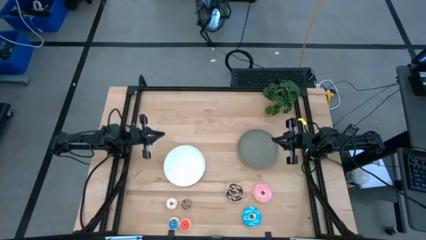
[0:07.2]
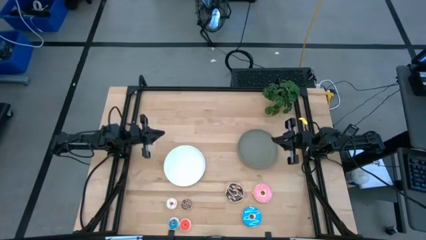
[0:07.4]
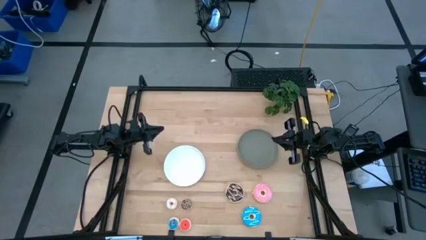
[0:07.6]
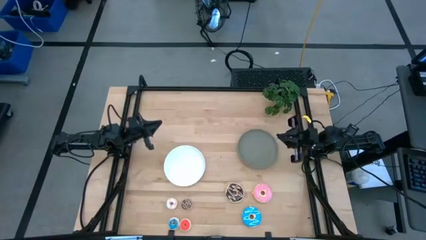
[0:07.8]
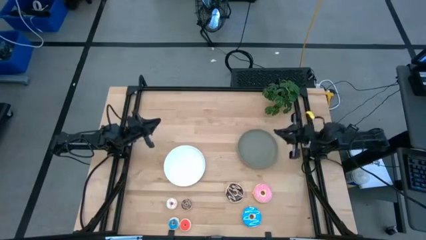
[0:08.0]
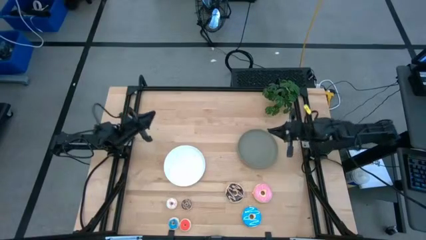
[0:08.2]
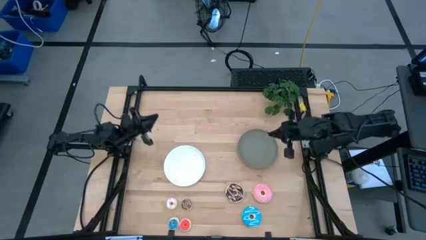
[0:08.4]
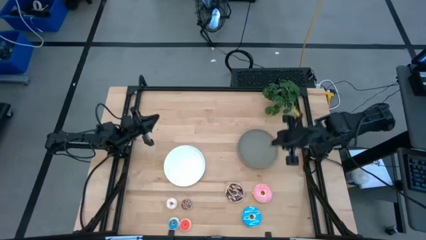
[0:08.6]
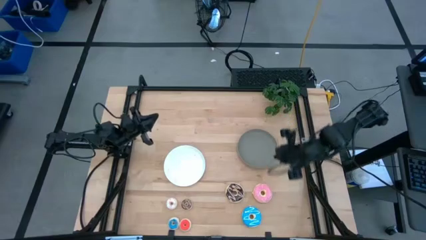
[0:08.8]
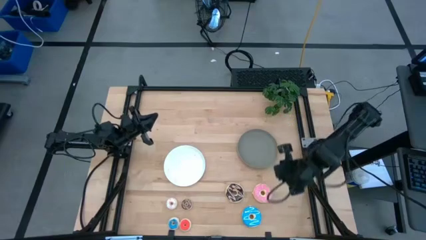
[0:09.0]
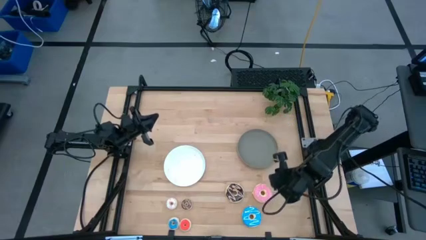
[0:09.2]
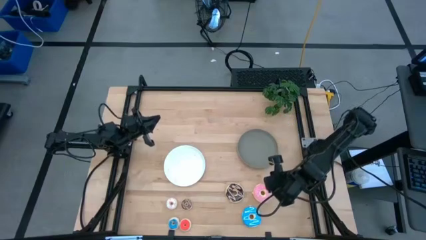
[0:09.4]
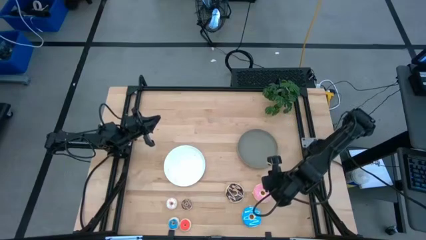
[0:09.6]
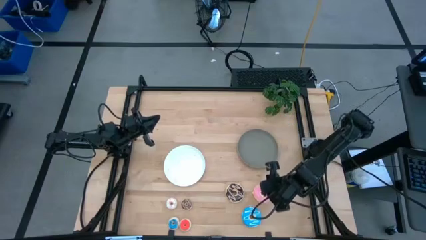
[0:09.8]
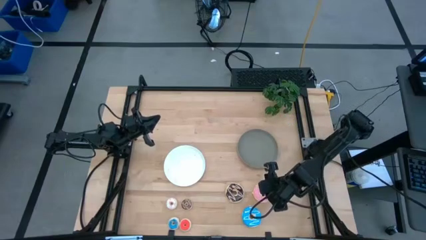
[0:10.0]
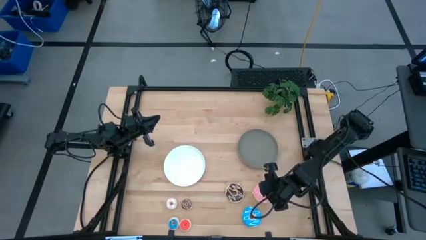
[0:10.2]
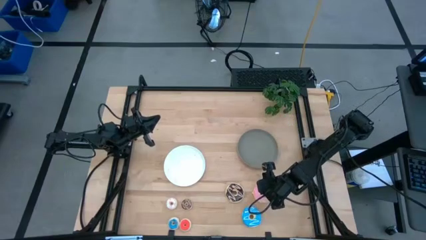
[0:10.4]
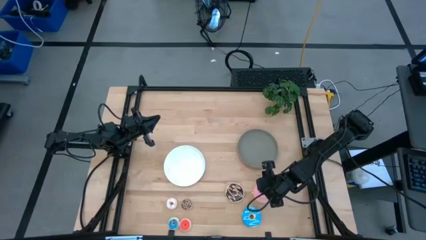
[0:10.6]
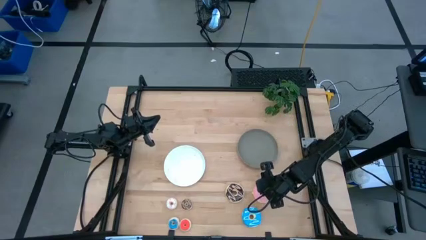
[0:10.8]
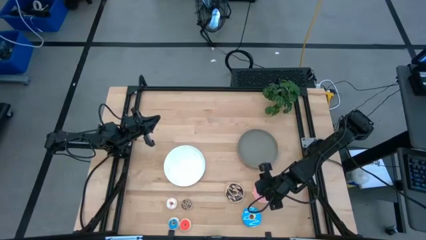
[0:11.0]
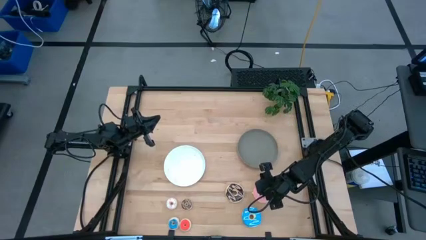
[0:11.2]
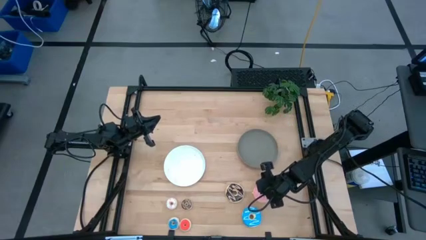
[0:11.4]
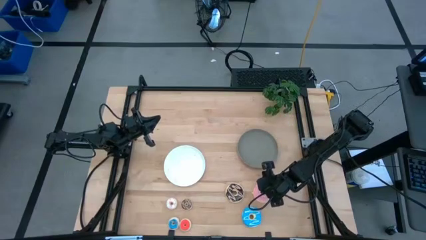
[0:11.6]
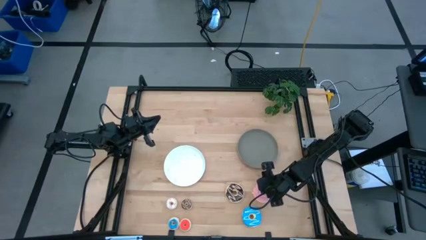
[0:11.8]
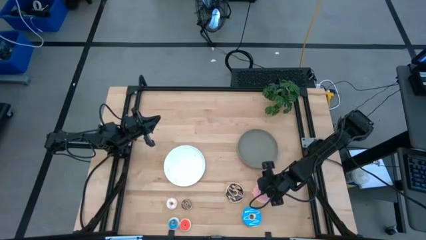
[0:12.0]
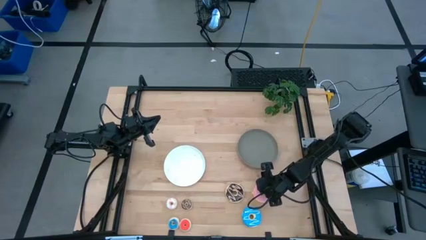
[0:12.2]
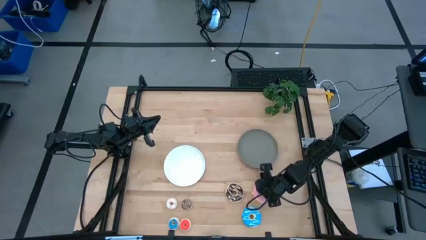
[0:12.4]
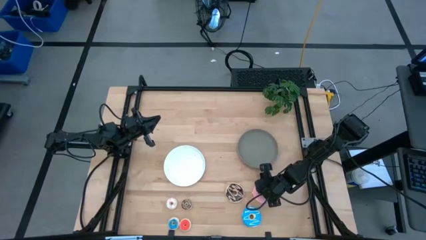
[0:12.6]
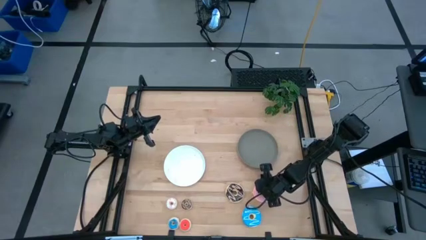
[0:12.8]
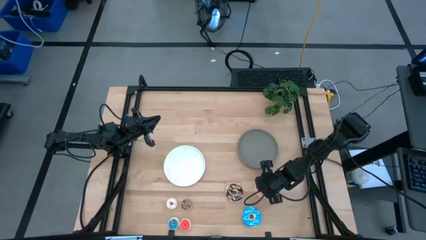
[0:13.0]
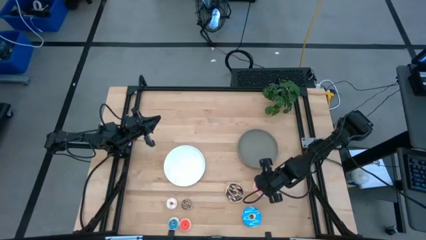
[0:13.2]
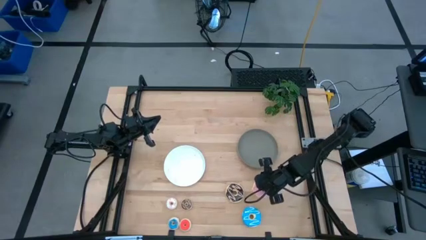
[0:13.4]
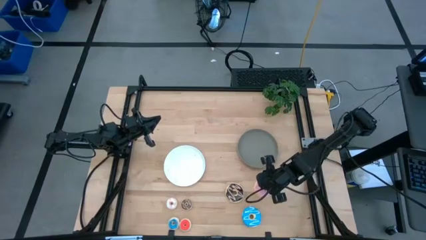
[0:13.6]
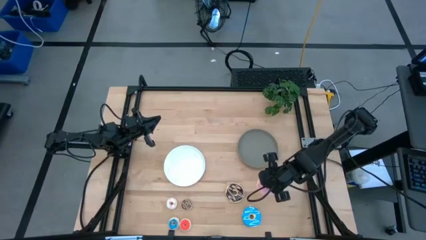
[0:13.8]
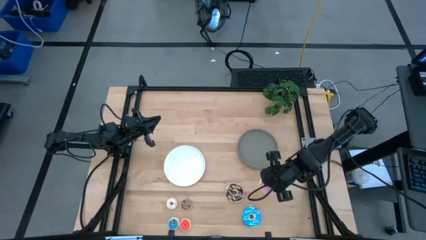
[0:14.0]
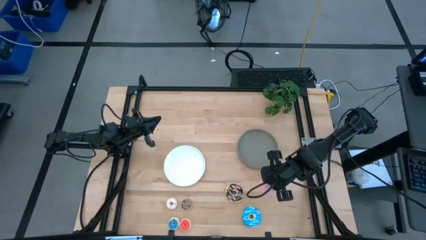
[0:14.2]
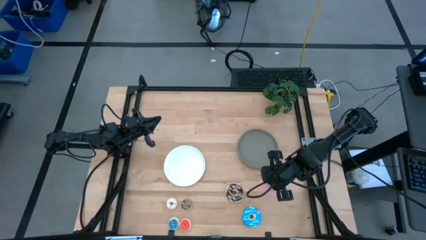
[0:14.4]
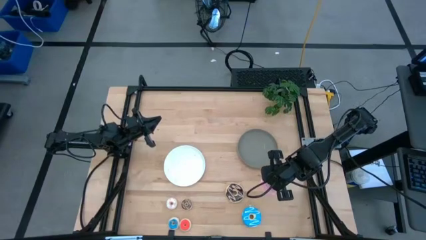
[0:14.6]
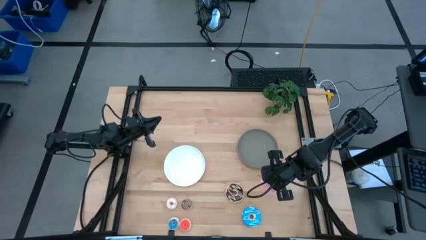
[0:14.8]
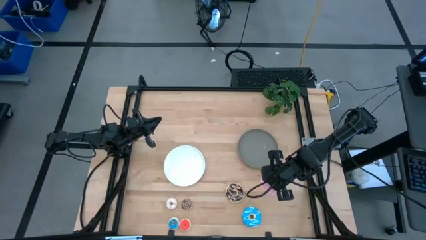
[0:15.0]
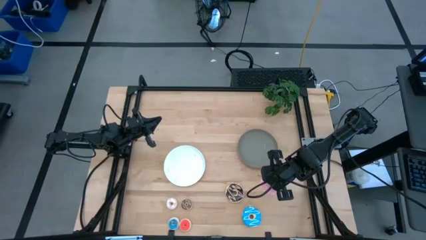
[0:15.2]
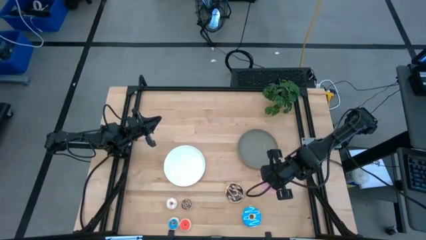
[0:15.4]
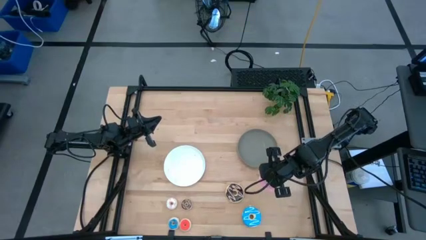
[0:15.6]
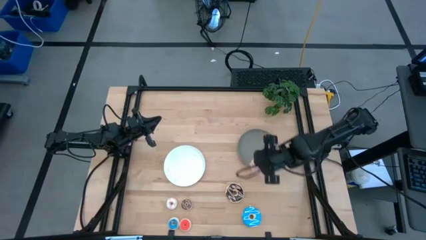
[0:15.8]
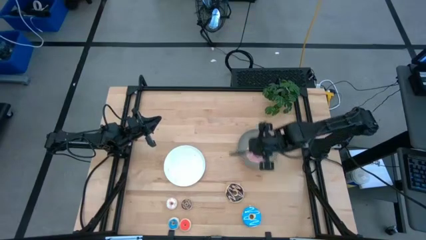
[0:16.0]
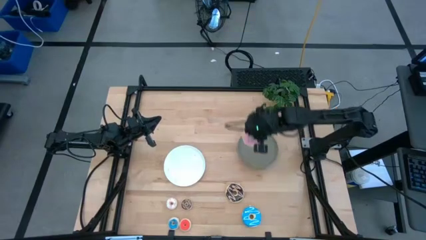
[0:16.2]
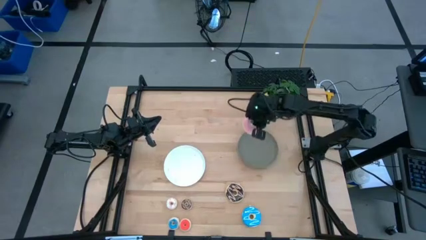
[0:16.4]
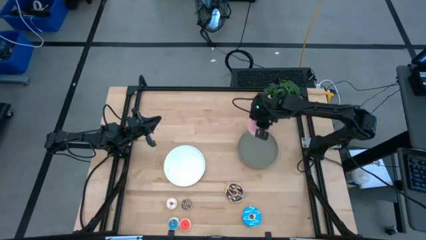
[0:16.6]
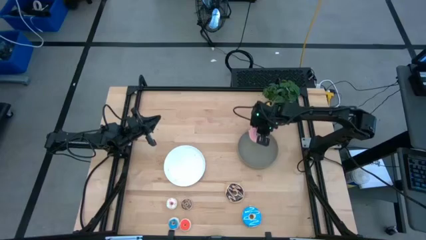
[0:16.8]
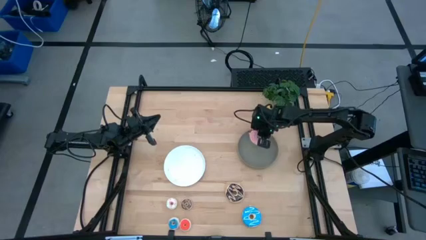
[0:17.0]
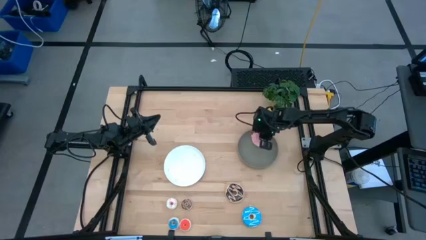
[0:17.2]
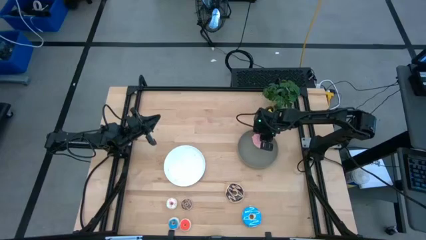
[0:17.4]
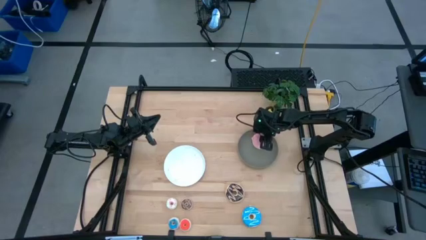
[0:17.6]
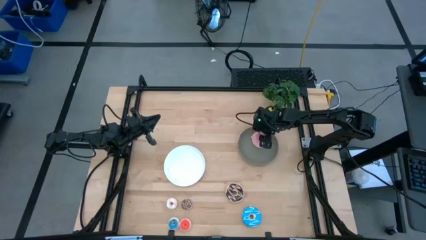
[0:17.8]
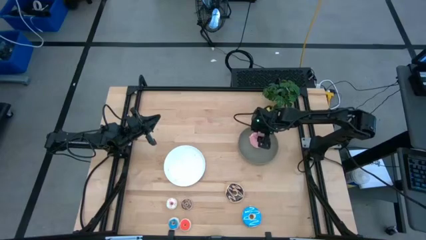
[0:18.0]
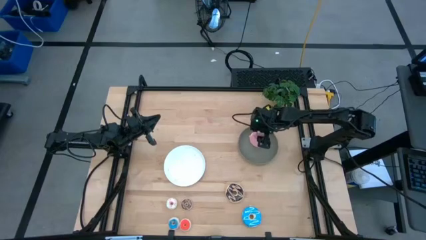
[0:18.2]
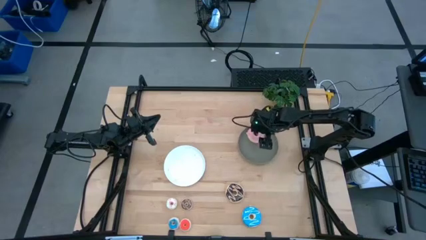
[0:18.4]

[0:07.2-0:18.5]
Task: Pick & Place donuts
Put the big pink donut on the gray plate

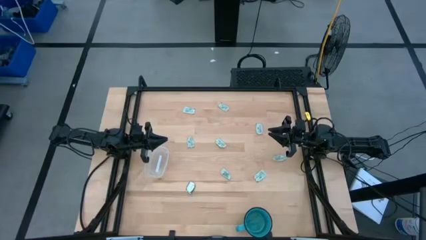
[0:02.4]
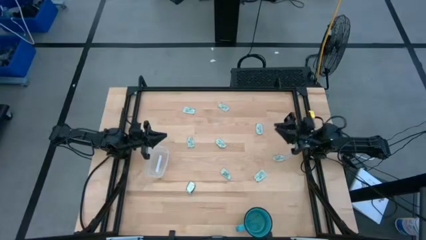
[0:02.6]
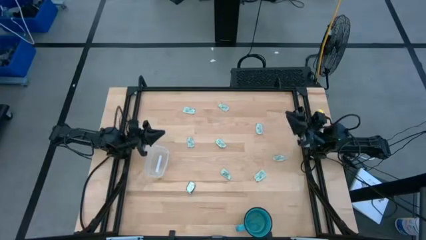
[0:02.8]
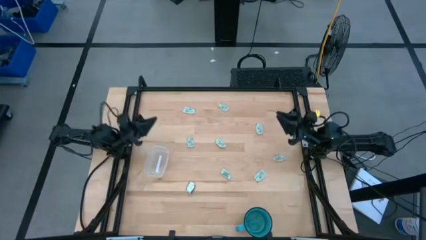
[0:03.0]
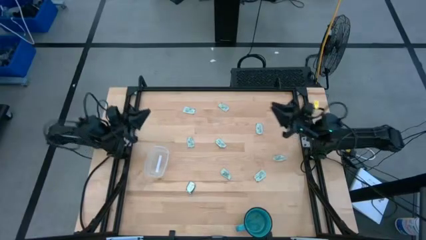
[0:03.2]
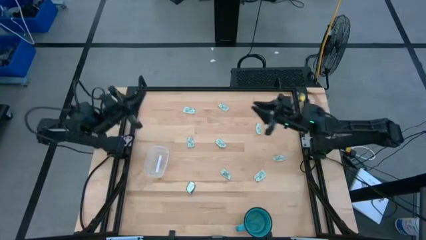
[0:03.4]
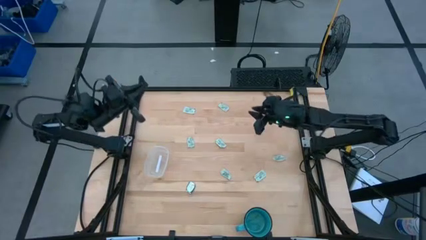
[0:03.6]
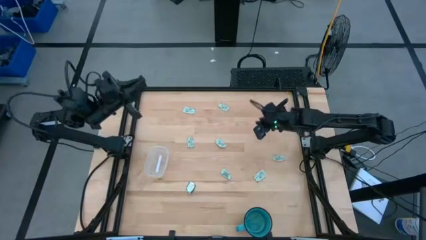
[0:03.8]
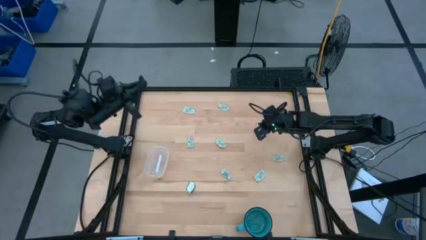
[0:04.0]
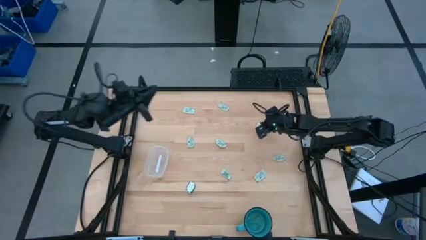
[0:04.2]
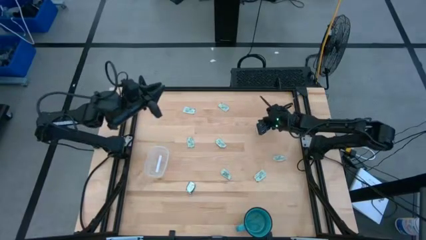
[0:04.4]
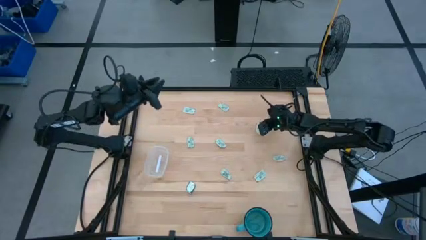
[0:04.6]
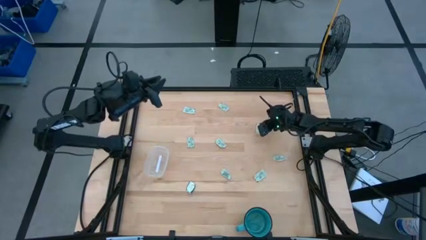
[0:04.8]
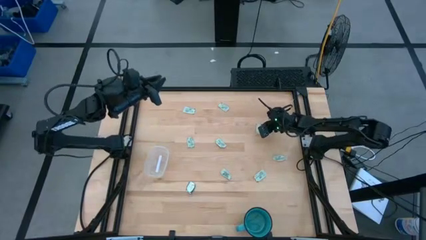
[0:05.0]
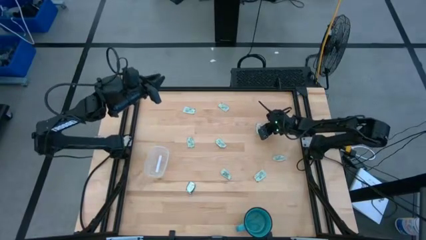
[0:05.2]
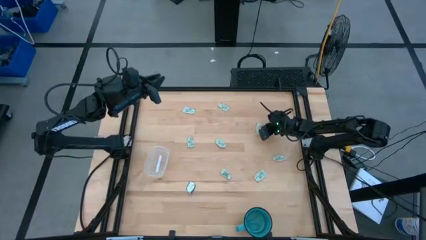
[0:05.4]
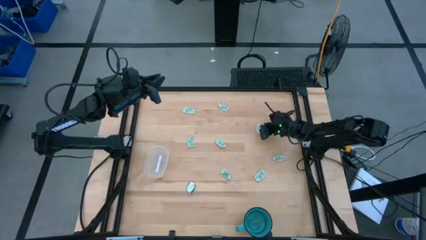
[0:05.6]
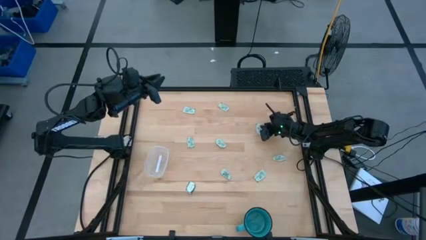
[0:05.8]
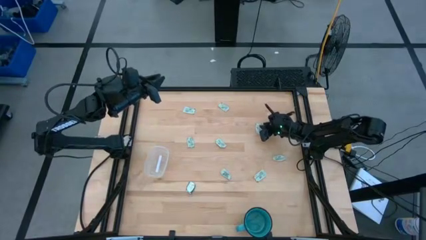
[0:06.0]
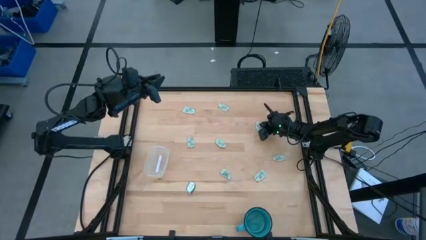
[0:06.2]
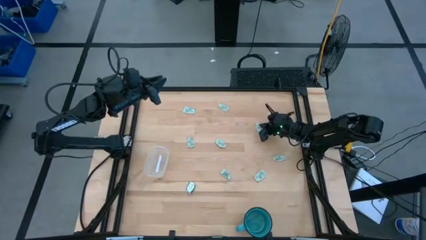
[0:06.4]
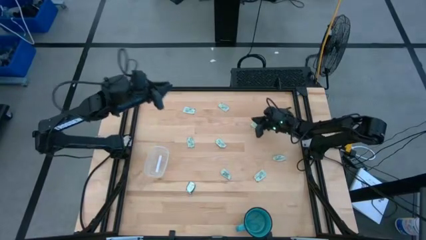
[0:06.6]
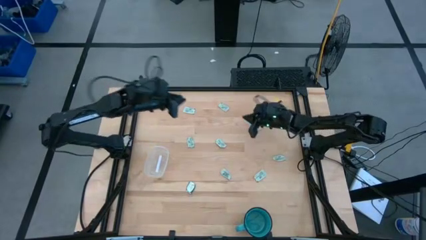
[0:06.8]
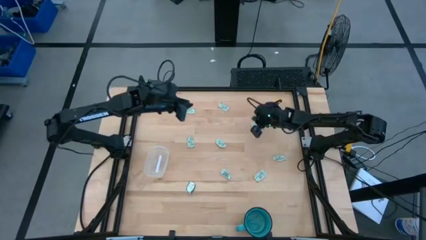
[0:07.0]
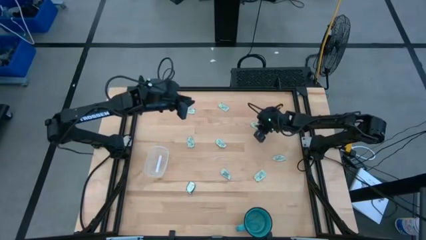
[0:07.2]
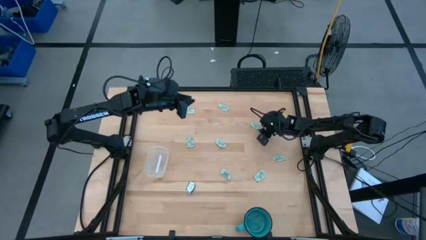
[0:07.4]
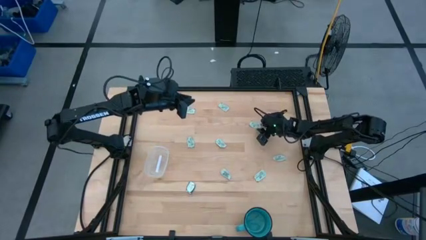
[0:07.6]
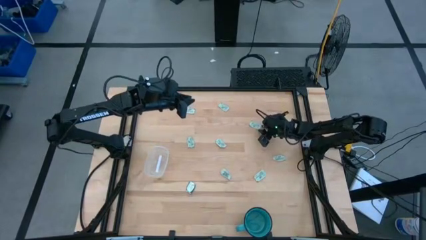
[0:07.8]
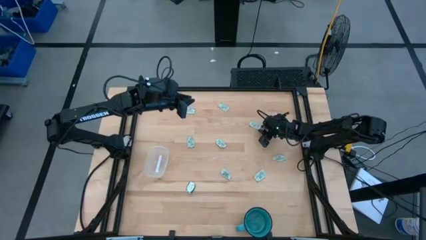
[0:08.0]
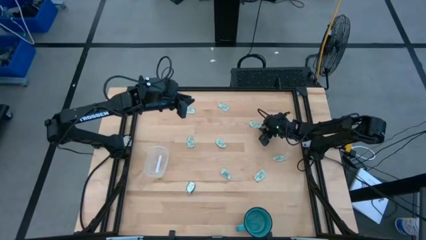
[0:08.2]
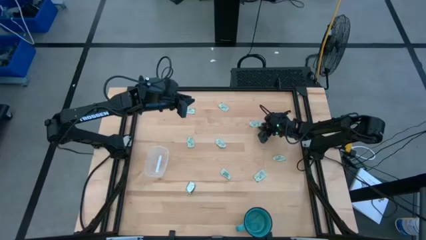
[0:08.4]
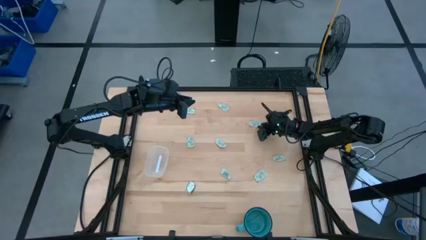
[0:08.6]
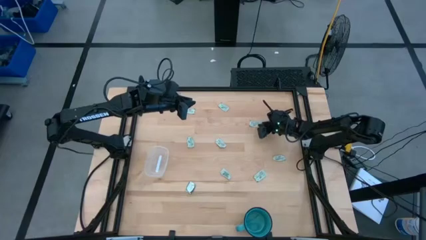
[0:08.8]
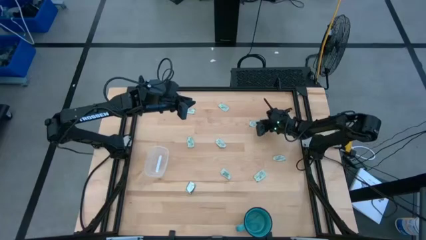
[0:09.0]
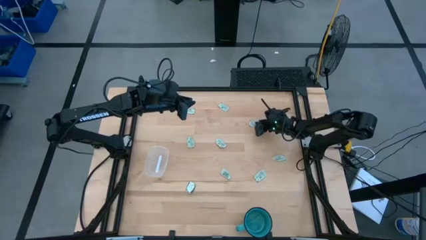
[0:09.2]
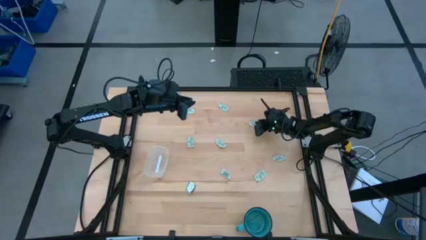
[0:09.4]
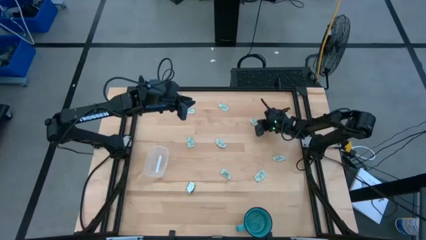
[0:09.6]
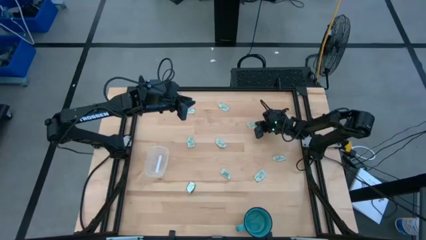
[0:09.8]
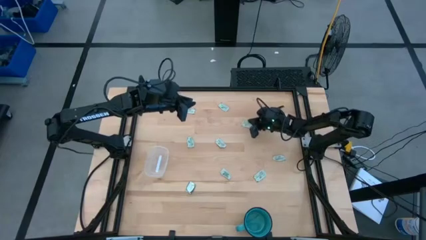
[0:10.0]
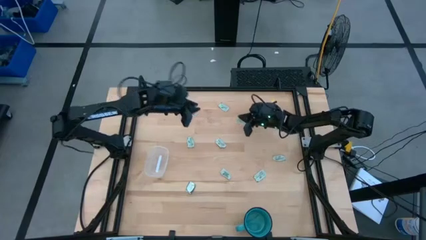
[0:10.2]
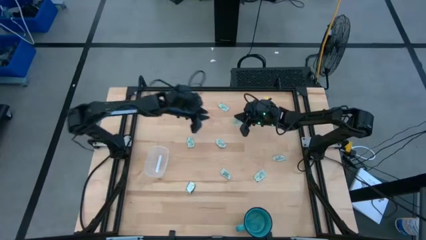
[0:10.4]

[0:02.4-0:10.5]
Task: Pick and place Stevia / Truvia into bins
Put the light green stevia packet into the transparent bin
